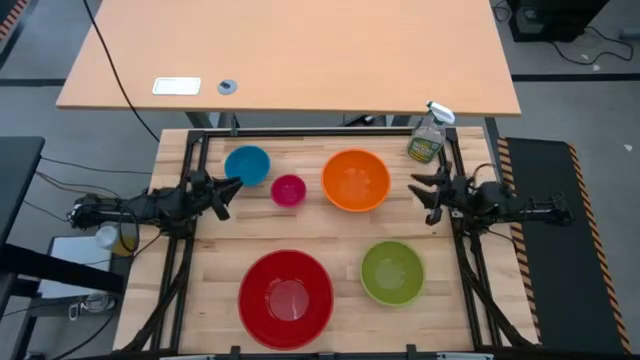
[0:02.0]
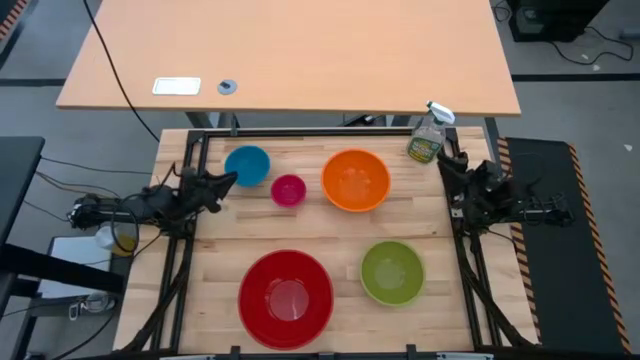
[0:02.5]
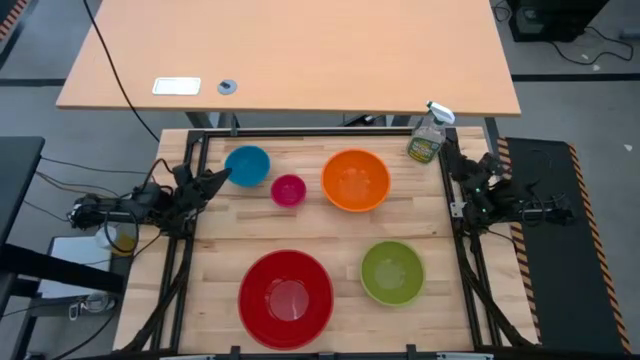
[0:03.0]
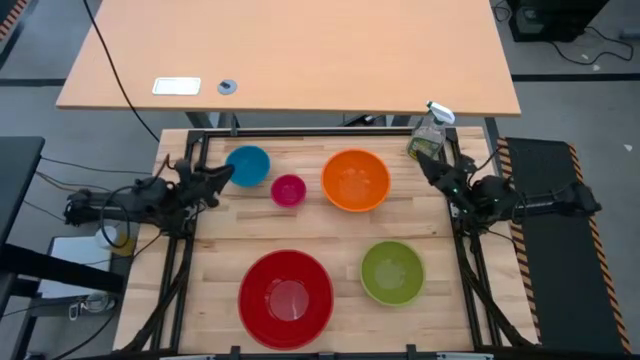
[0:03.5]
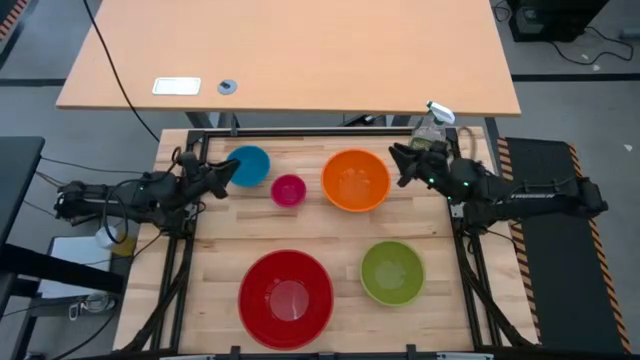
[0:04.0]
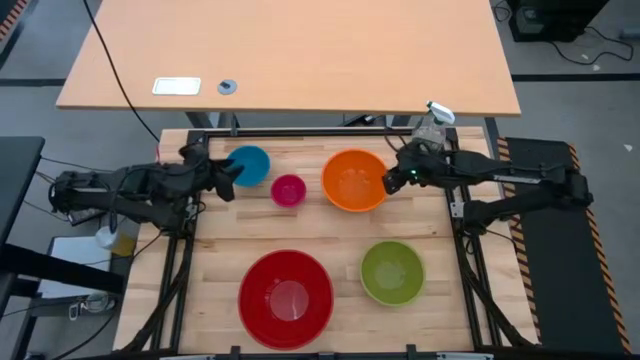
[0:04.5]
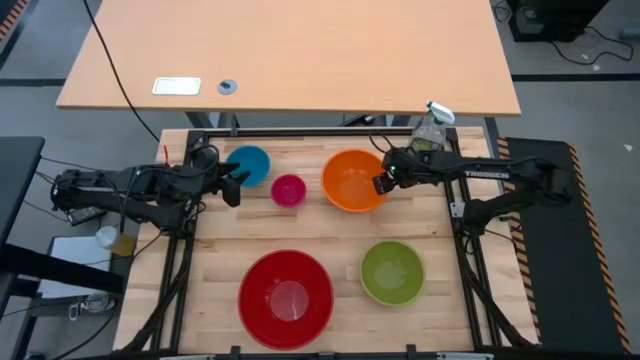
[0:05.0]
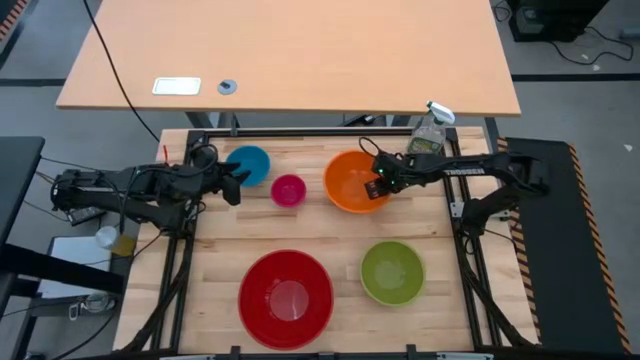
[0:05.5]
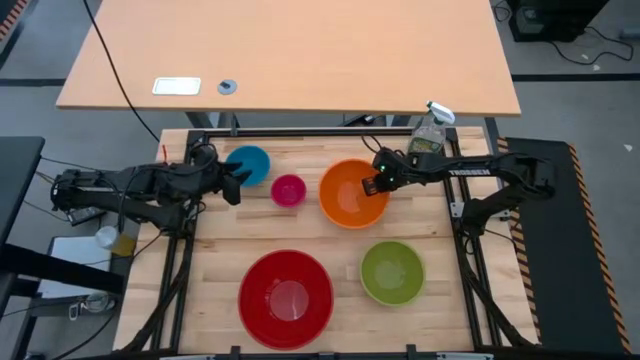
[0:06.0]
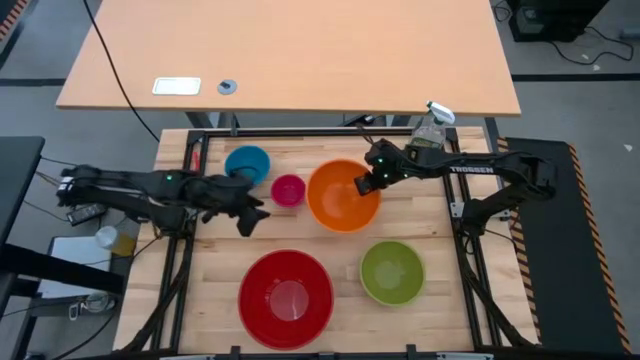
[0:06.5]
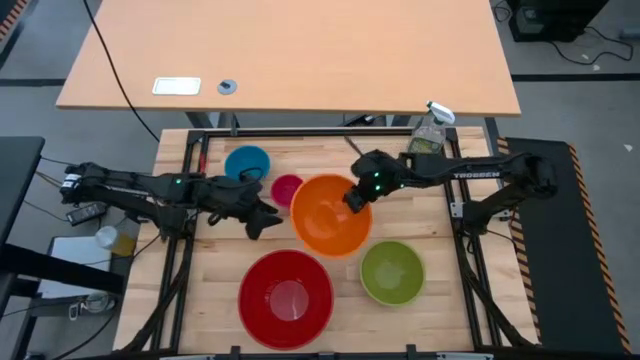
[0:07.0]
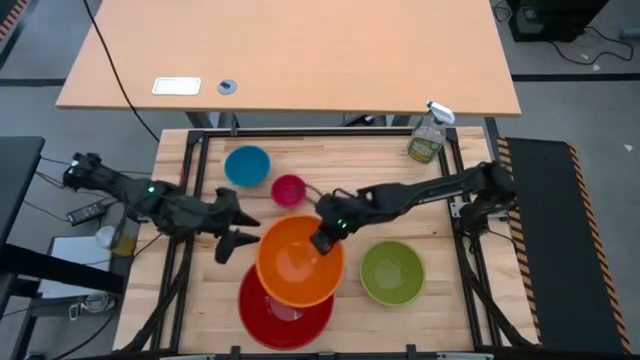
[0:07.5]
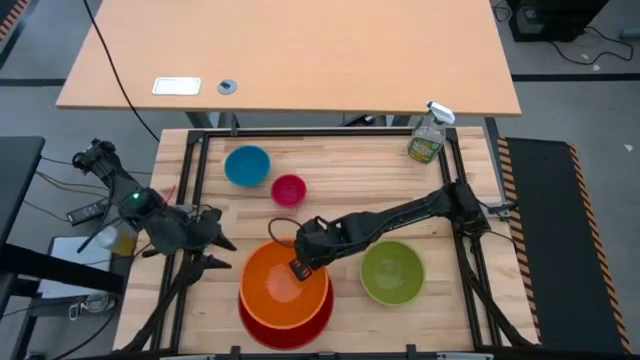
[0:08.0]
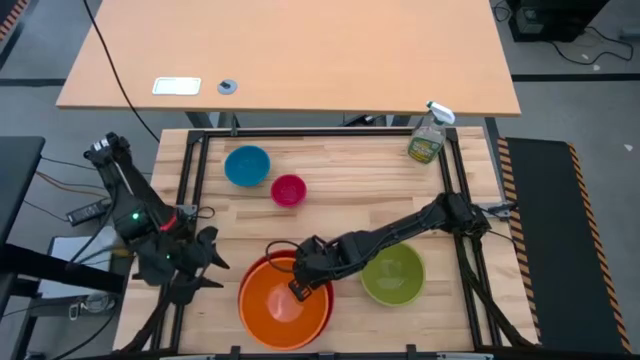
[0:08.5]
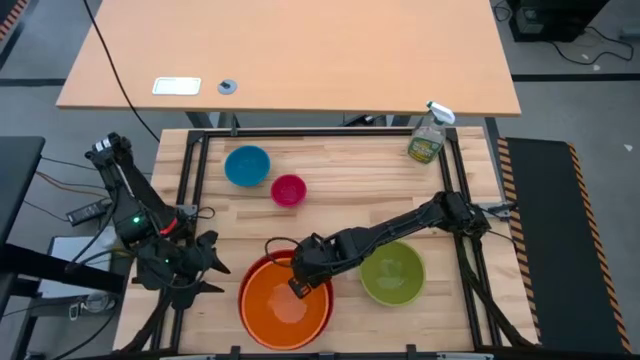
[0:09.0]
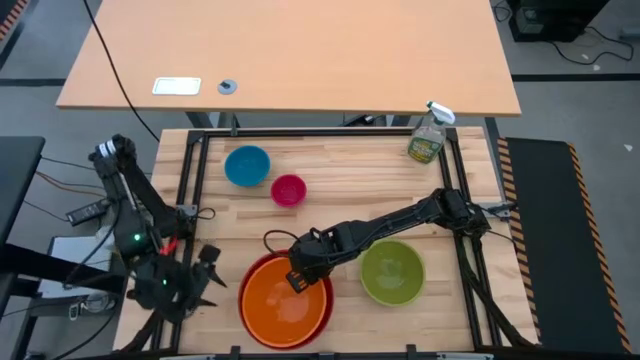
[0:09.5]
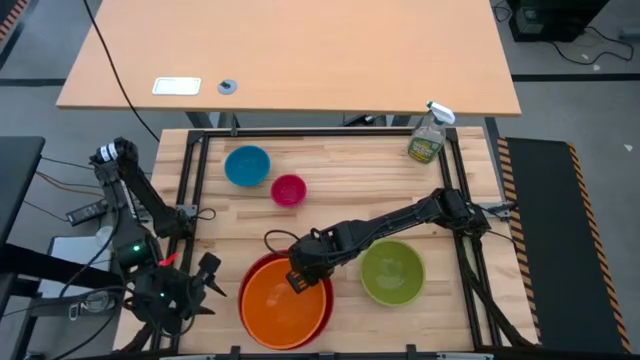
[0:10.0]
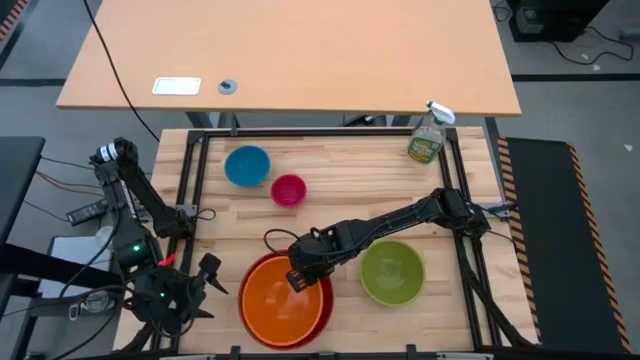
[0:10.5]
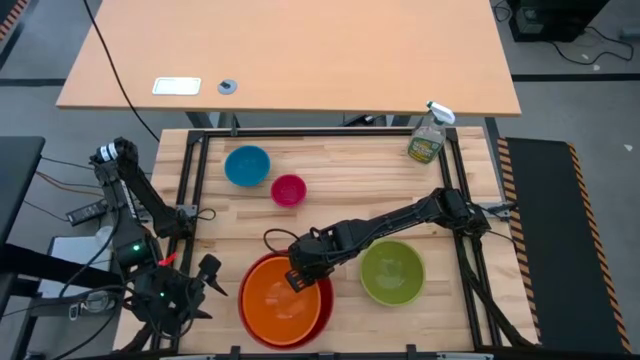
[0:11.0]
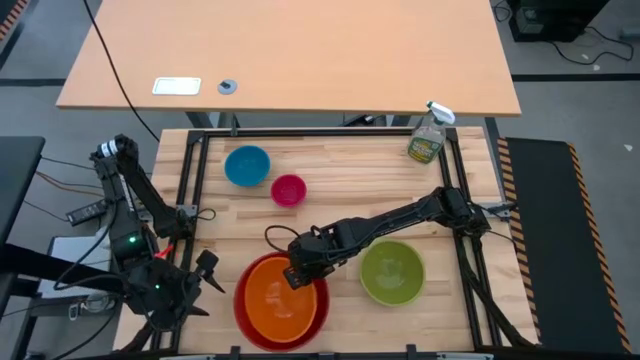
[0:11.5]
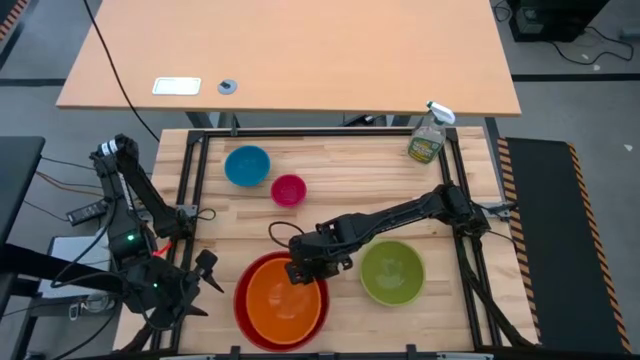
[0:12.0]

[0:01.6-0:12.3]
Stack the orange bowl on top of the red bowl

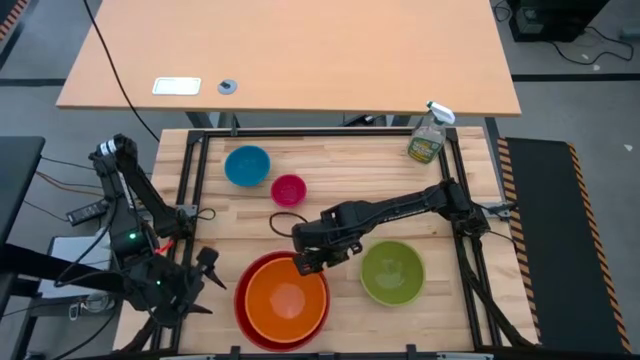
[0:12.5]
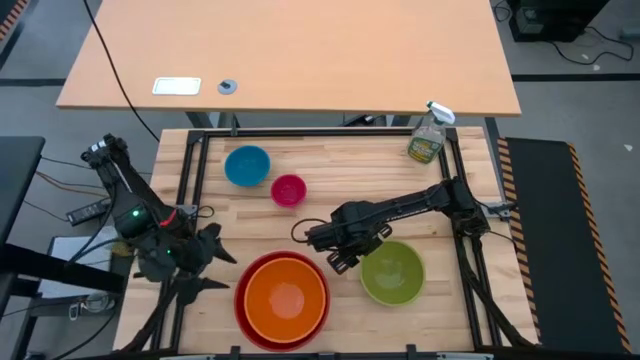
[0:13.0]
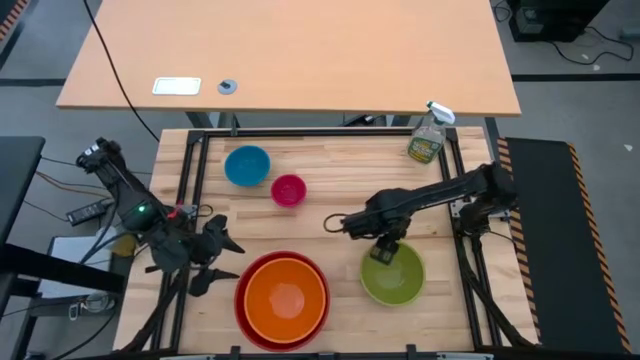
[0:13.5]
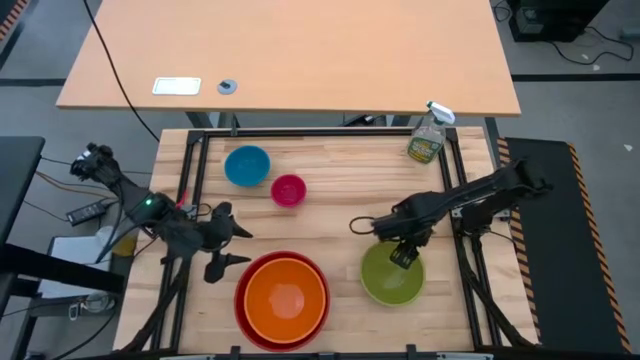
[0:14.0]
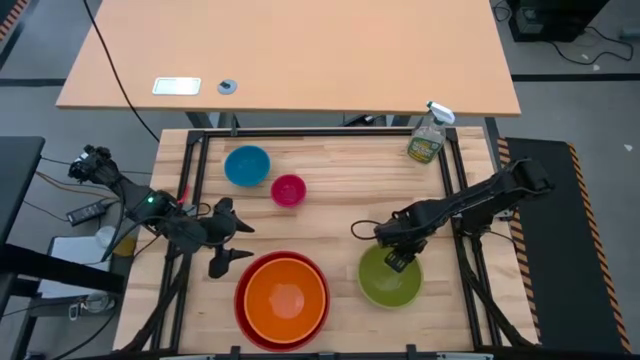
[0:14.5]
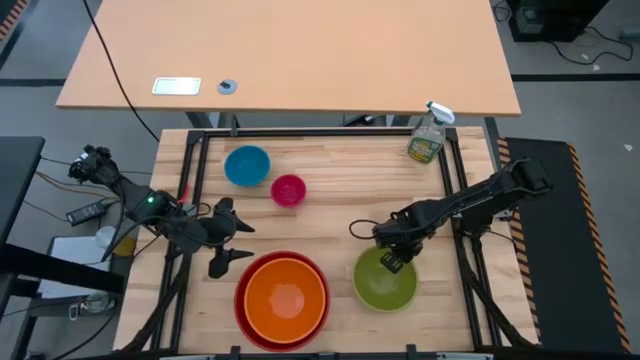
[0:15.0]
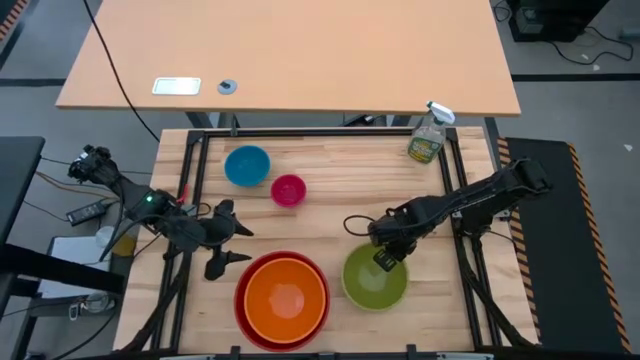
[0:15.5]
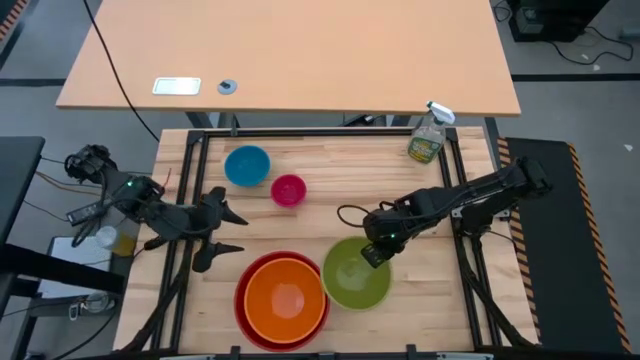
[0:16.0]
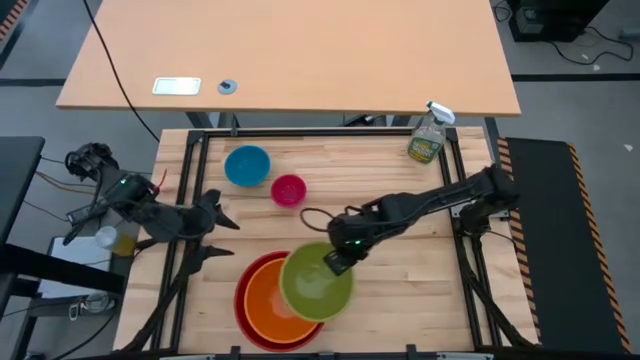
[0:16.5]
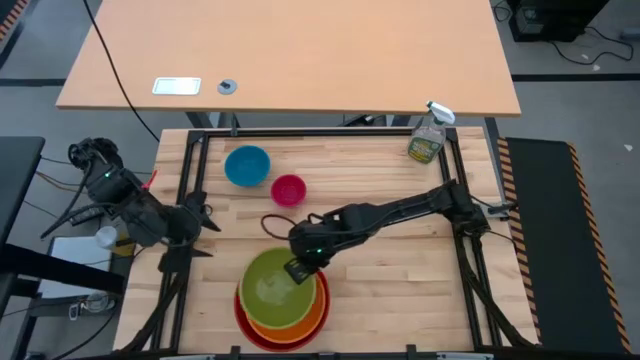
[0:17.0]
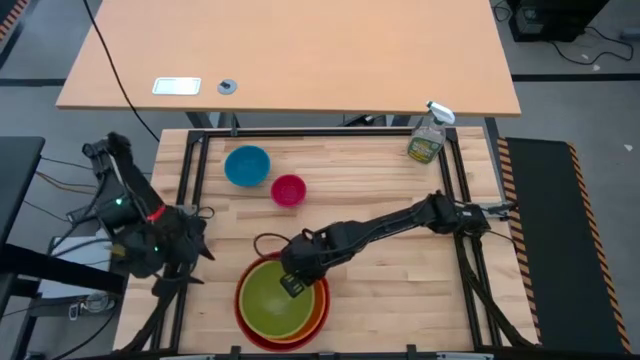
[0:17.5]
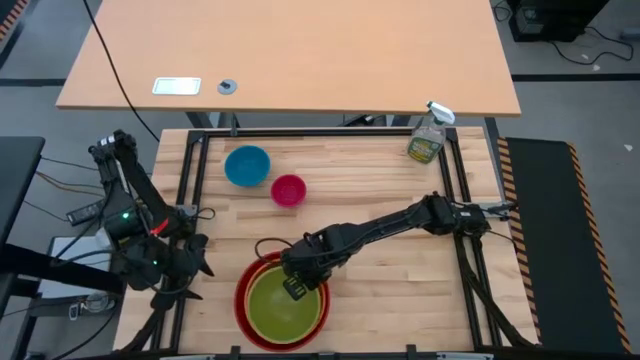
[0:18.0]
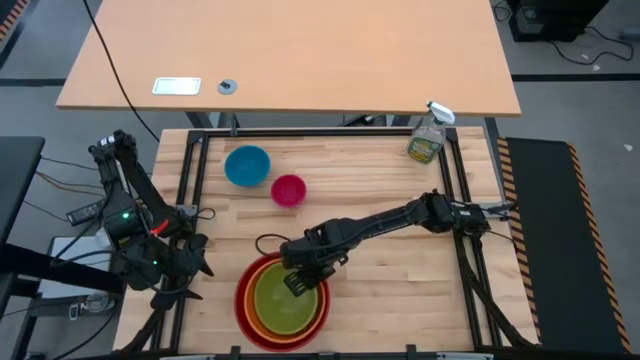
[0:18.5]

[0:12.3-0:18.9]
Stack the green bowl on top of the orange bowl

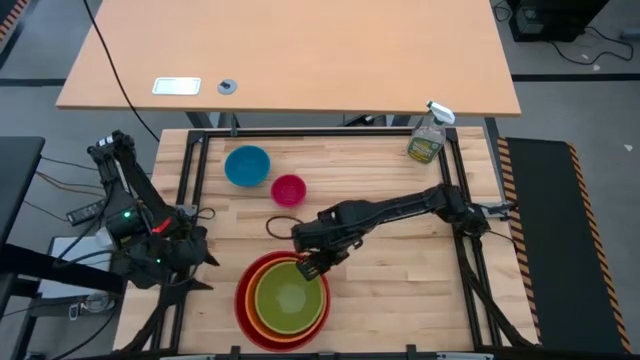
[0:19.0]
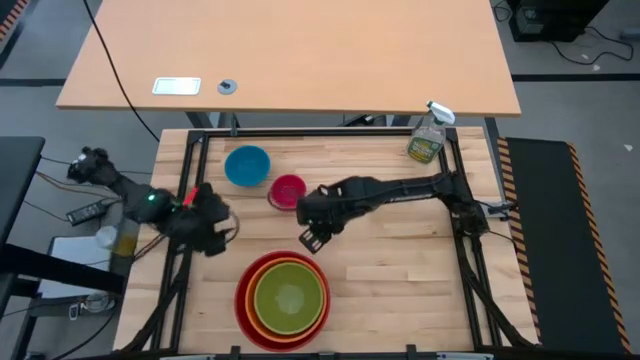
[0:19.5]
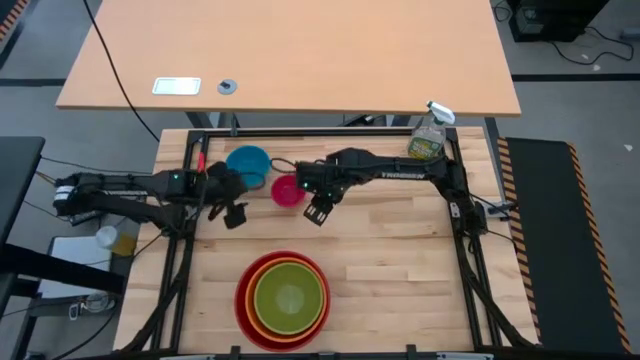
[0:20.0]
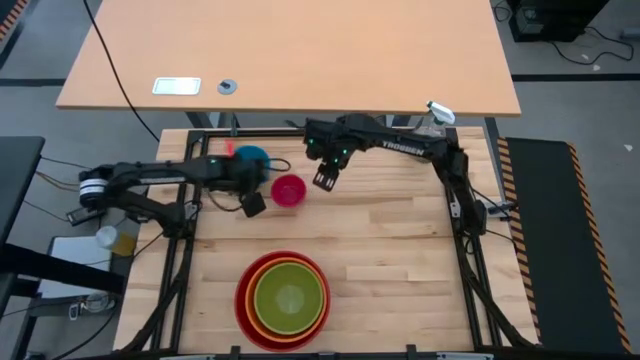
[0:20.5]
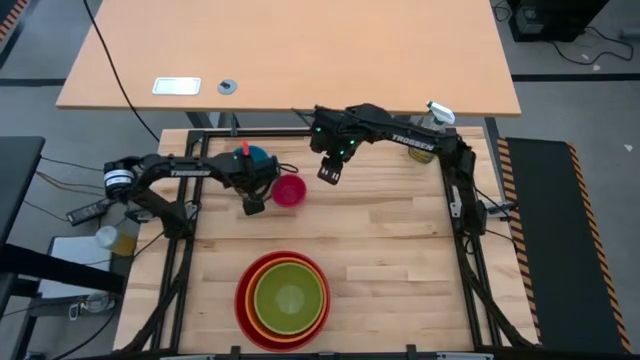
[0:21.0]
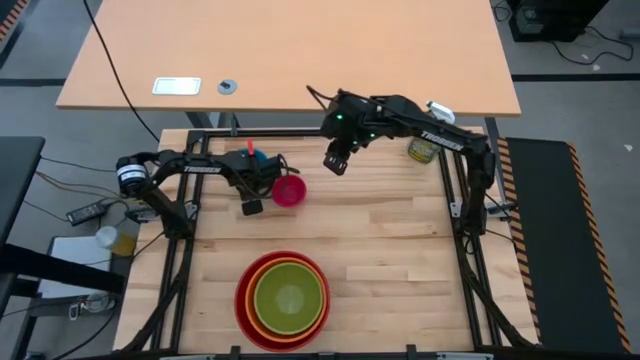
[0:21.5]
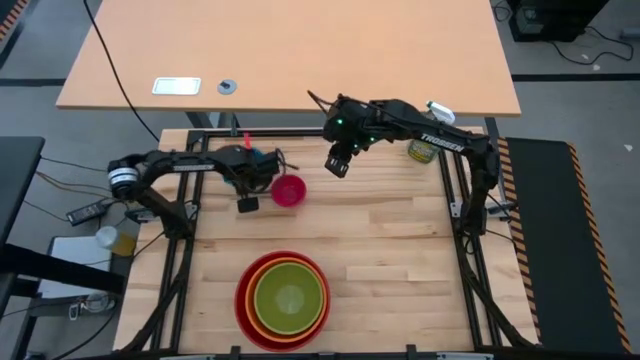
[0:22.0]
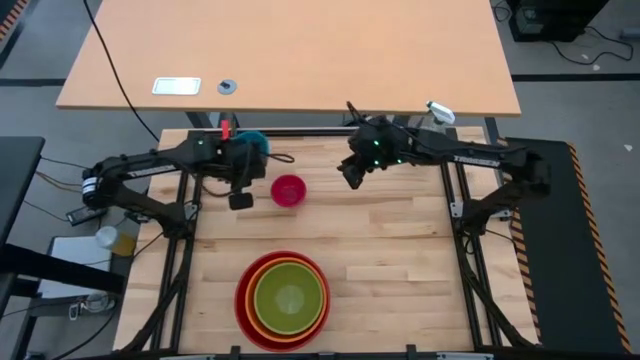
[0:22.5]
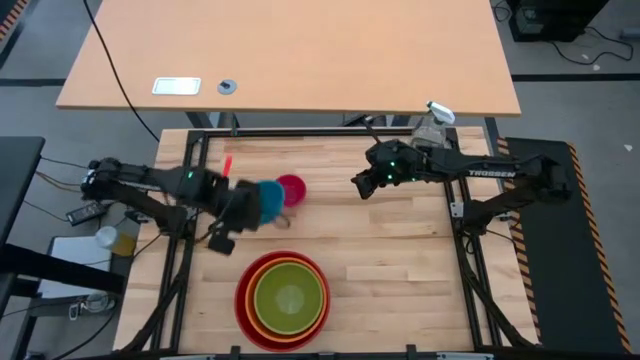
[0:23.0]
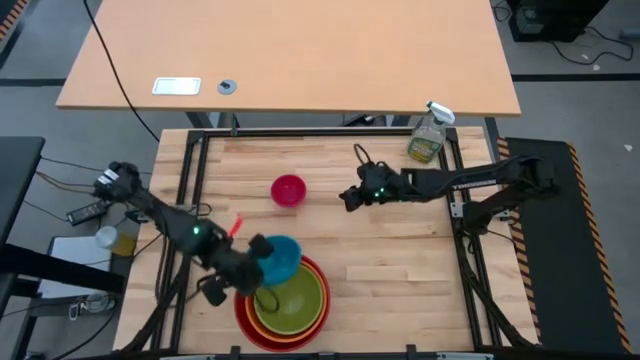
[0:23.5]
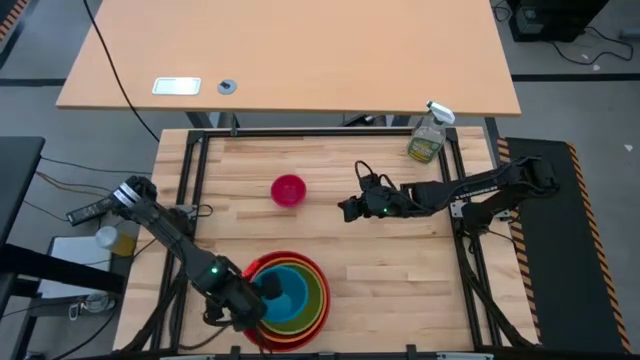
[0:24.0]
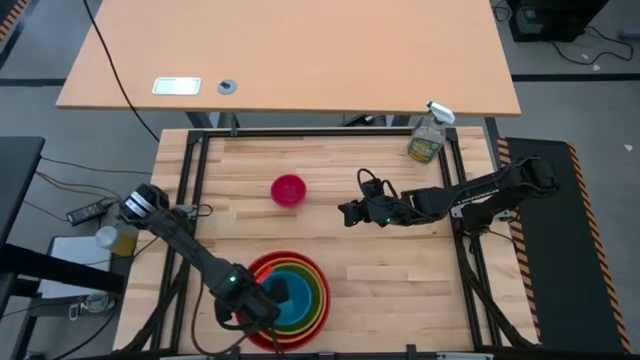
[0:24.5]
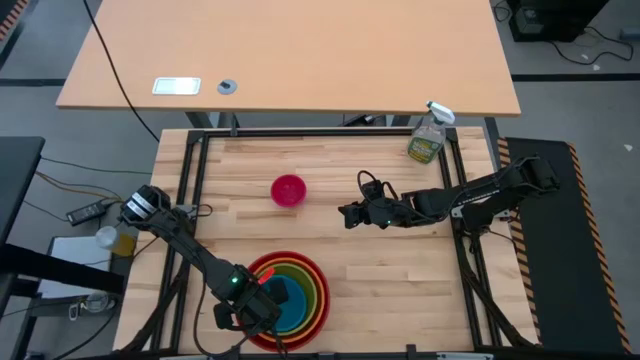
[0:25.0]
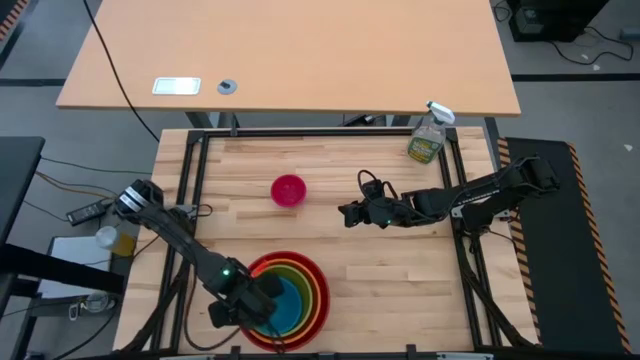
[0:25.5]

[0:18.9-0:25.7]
Stack the blue bowl on top of the green bowl
